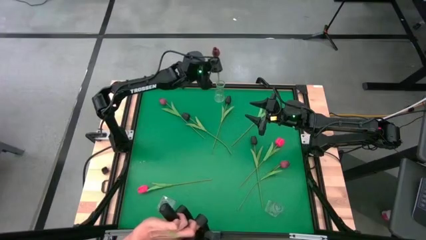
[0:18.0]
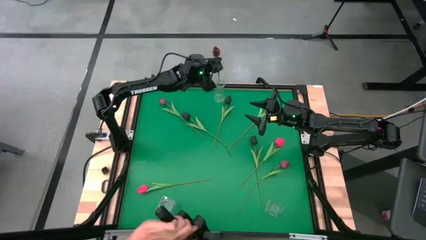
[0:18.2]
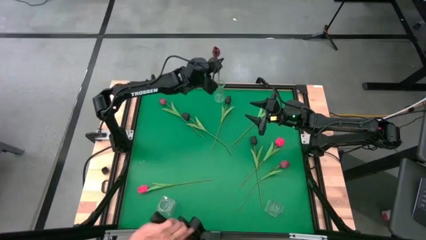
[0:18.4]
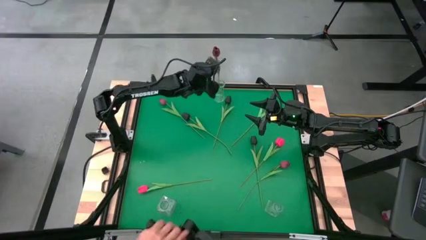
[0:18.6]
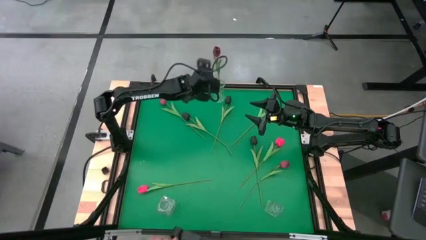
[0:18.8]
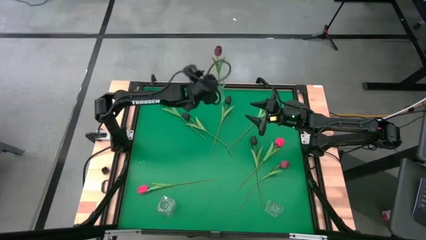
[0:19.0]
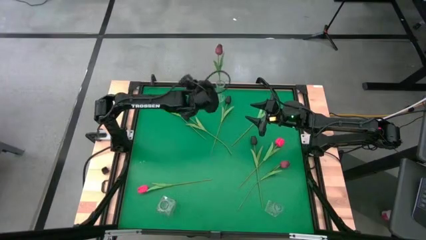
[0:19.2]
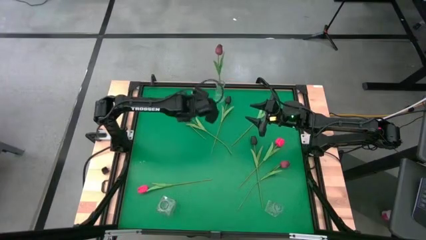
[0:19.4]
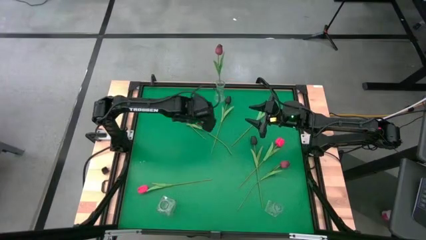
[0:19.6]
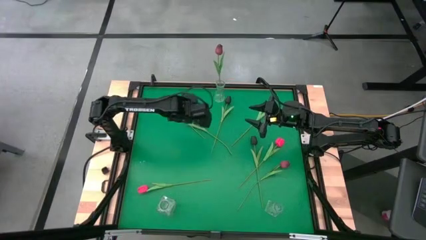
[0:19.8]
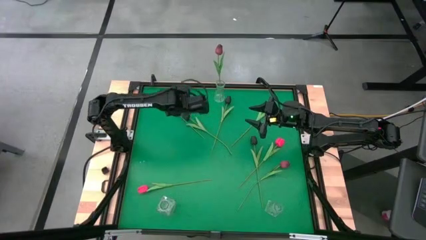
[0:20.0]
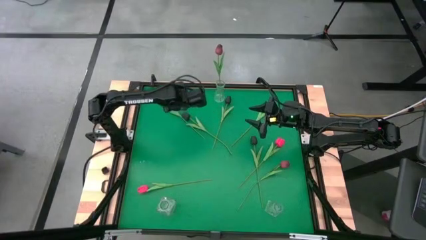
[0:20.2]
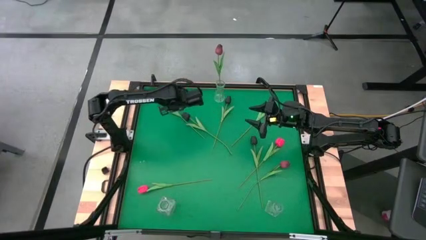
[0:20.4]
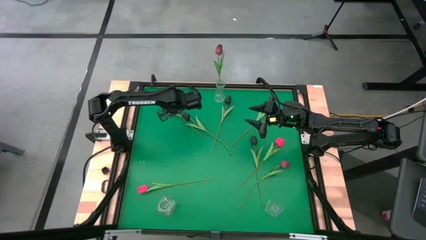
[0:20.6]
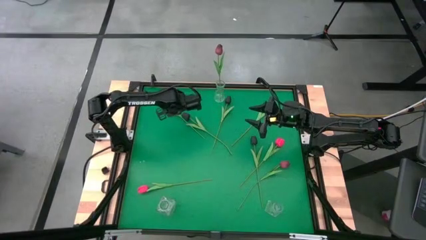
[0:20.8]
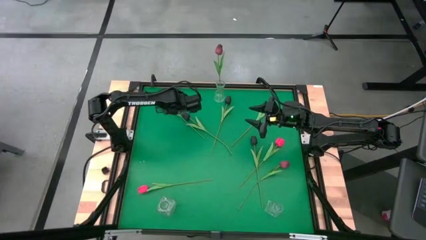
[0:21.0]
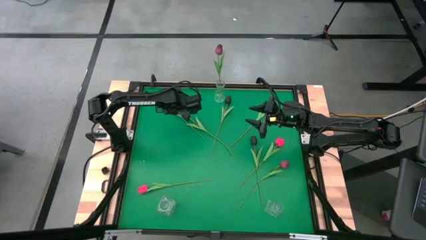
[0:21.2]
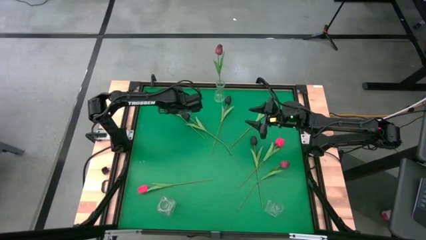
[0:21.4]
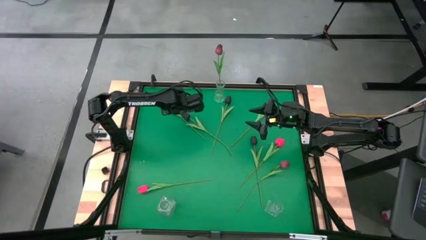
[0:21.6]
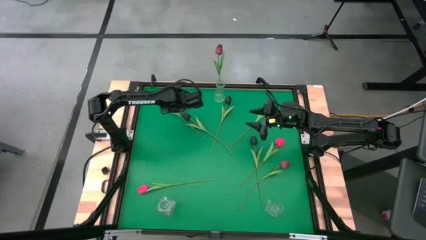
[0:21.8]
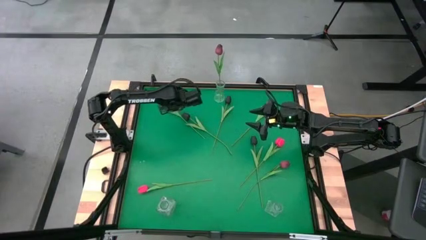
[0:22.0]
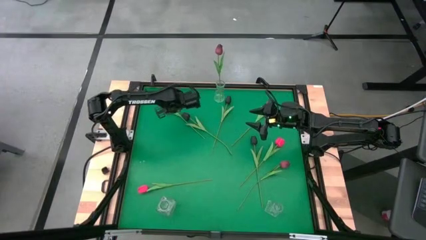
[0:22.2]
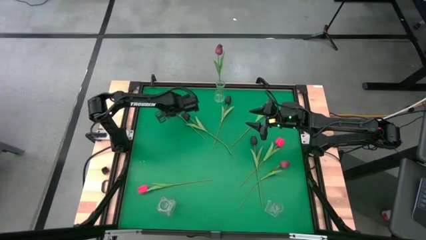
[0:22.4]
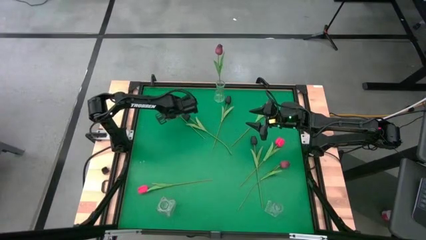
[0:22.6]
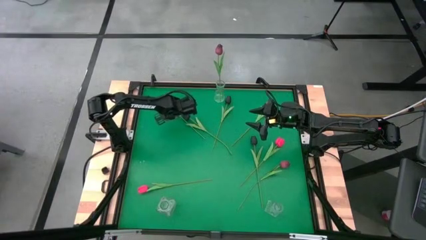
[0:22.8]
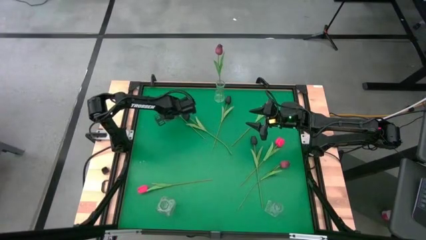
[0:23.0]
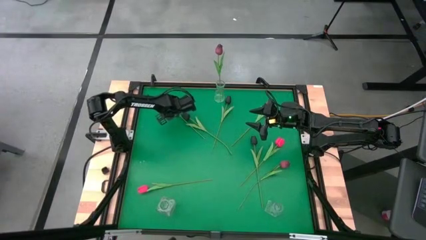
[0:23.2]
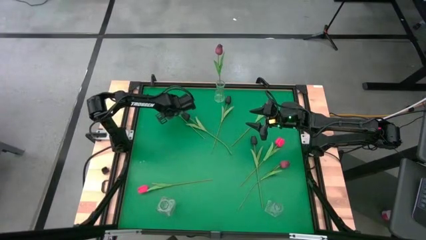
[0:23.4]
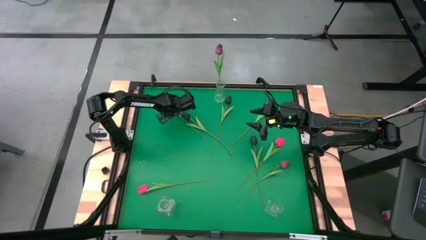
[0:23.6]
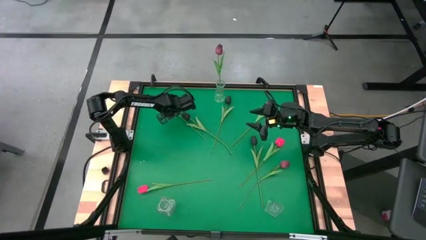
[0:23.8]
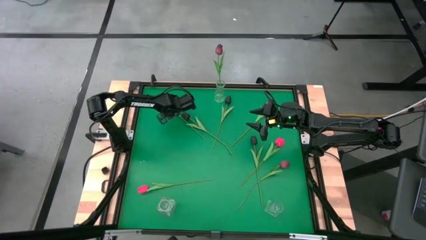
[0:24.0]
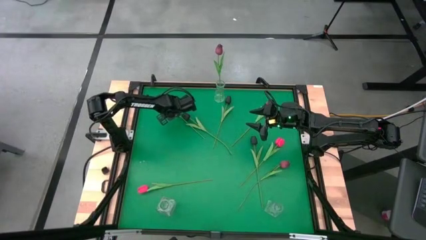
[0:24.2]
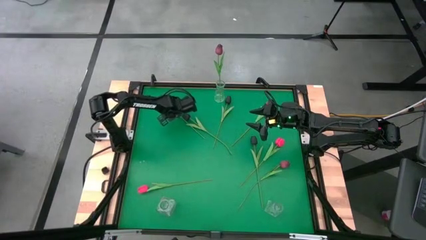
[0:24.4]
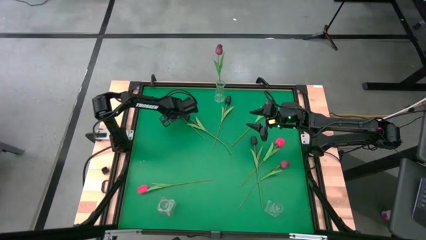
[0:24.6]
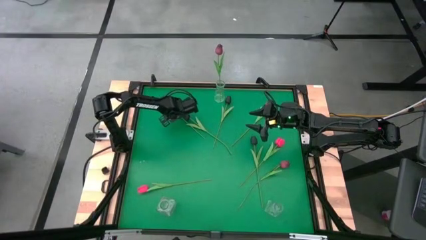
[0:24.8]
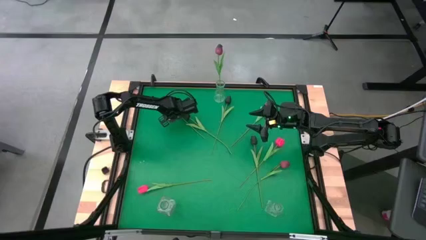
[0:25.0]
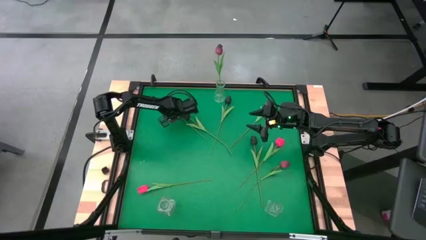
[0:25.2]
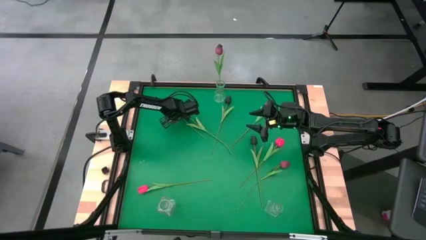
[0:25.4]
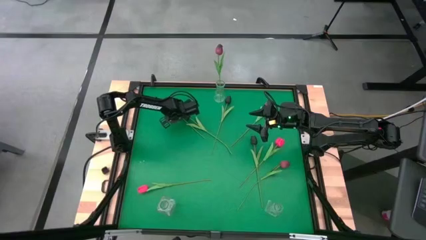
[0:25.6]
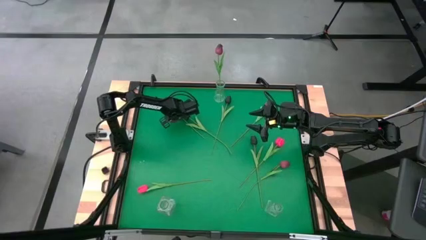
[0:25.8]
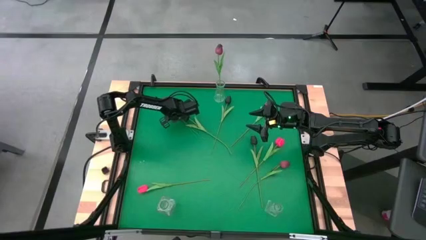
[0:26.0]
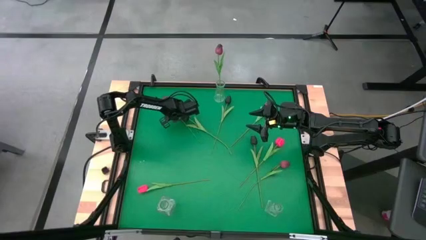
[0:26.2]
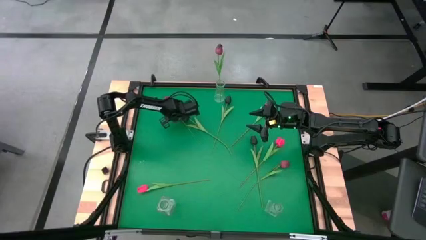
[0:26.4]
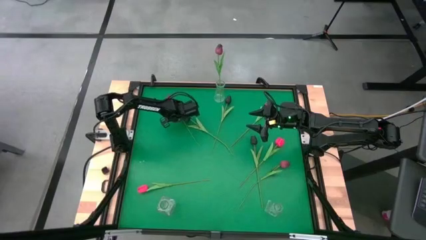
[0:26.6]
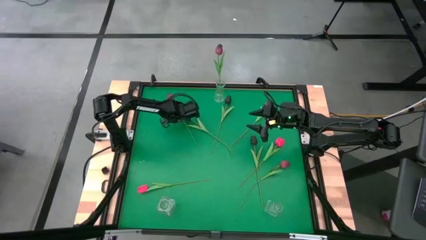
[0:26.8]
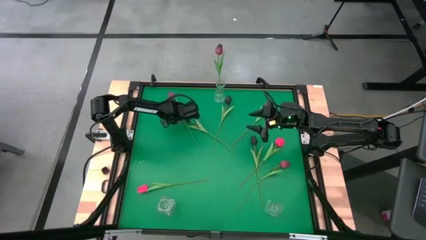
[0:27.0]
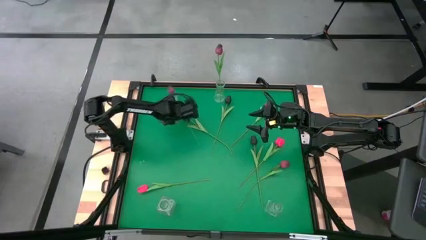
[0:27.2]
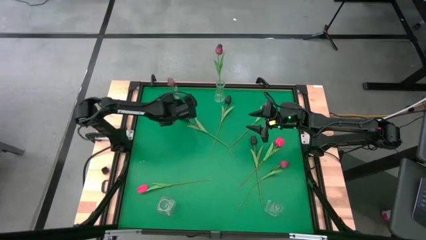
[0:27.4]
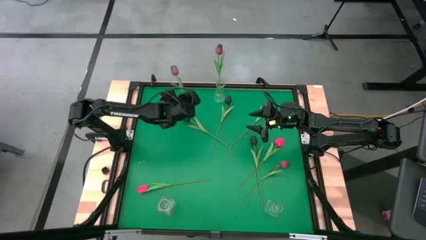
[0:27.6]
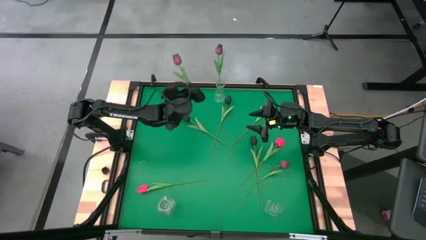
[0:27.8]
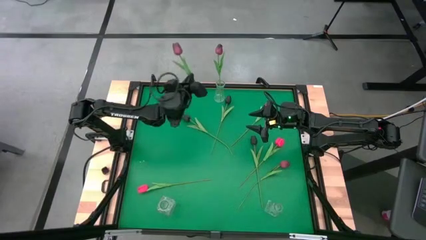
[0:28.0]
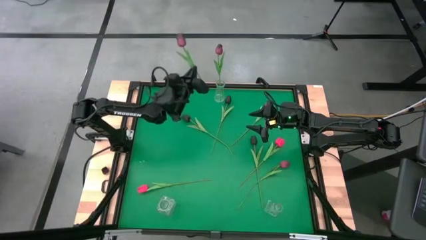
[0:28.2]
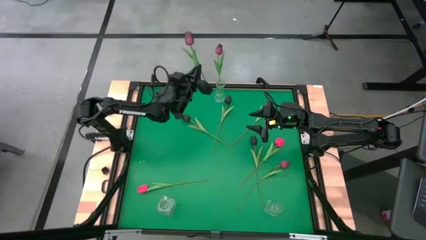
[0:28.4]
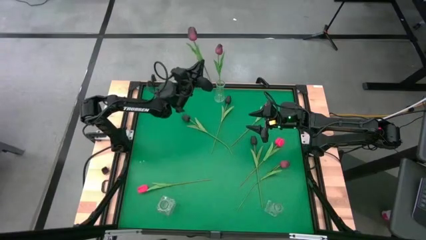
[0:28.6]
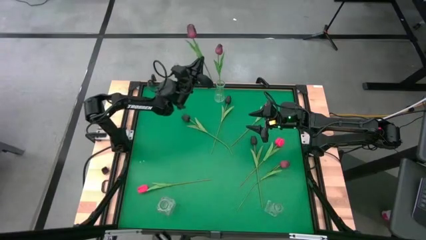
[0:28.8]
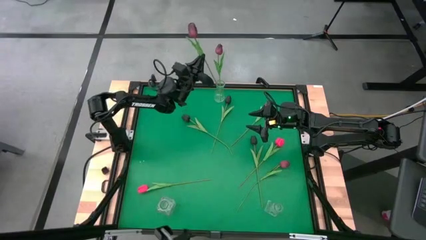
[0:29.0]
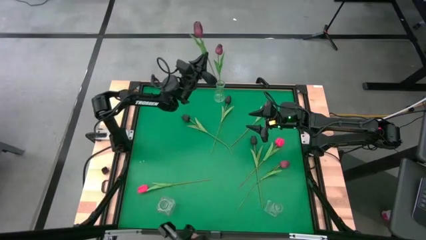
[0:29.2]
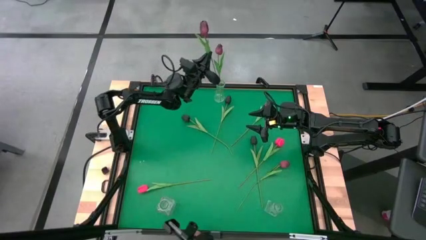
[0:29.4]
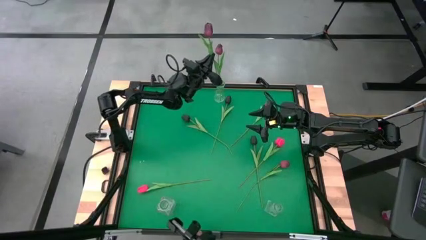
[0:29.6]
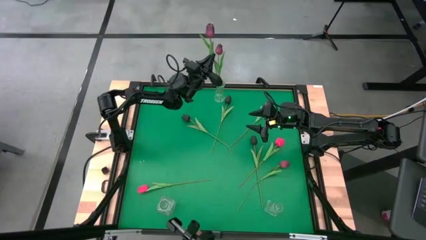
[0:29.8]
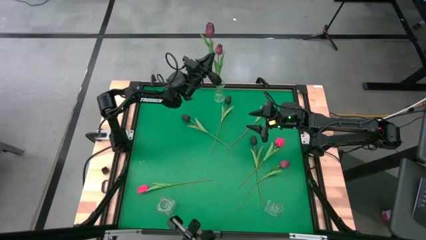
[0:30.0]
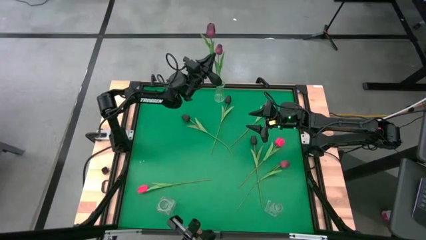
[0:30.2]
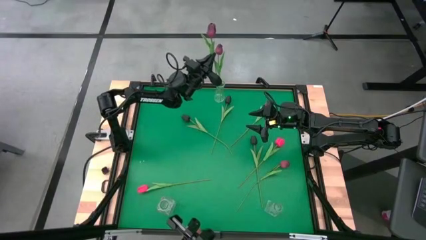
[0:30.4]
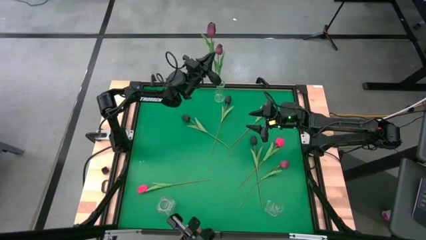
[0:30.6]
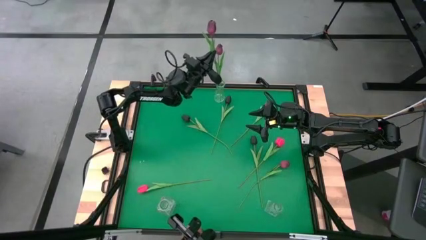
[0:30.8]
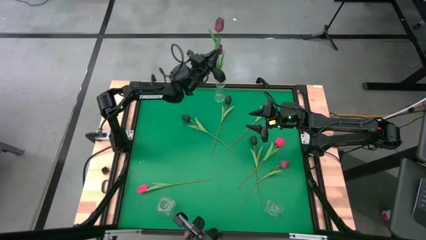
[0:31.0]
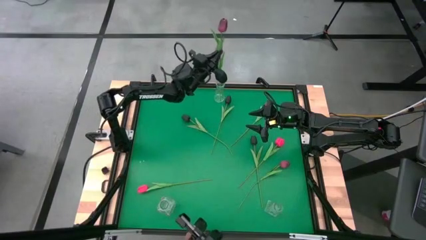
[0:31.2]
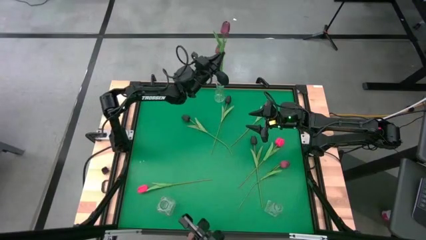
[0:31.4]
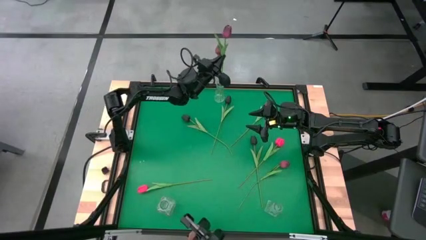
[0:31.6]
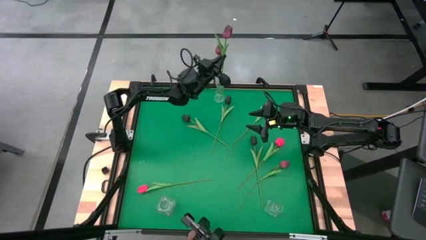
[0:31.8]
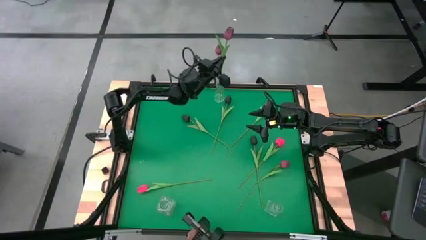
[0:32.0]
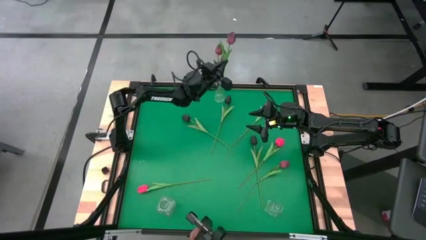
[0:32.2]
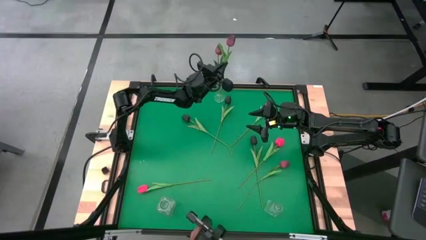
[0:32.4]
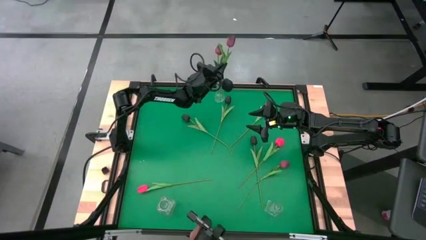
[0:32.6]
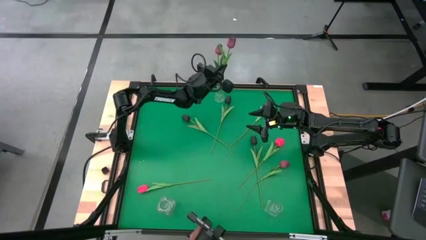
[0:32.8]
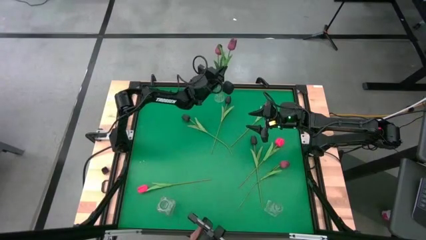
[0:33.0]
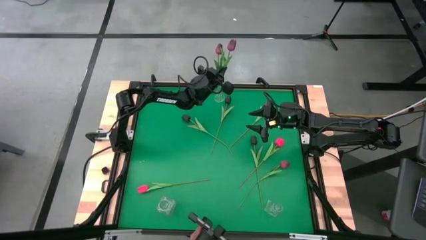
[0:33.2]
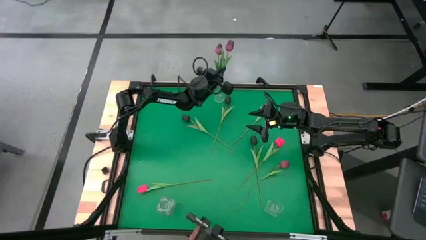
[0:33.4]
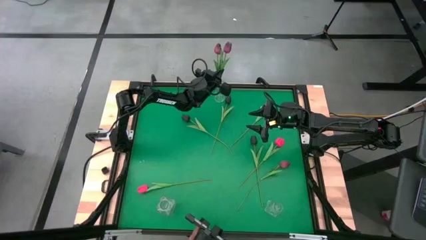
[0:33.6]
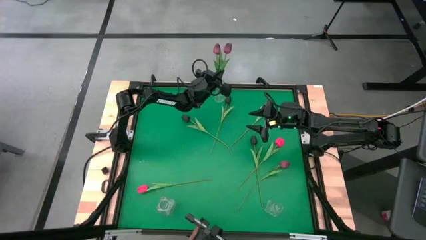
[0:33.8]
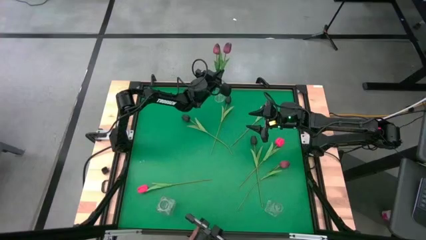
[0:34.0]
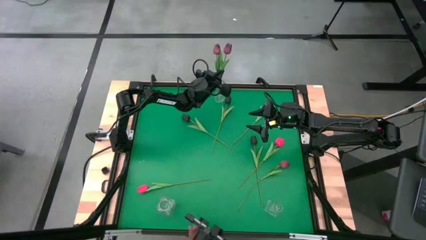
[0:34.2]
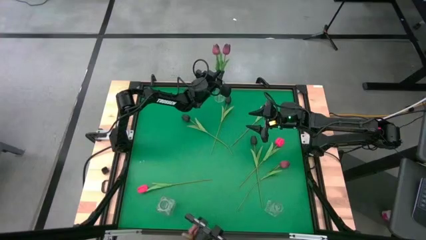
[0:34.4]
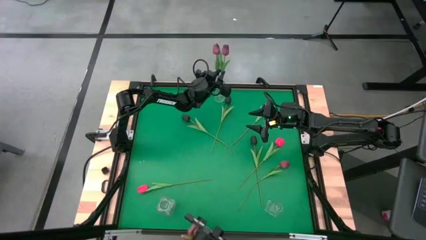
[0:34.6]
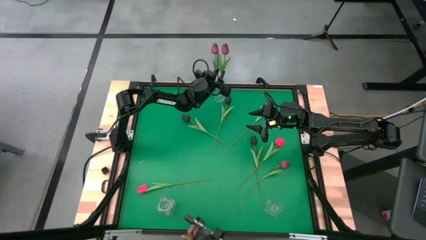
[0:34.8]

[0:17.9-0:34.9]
Task: Sort flowers into vase by color
Put the top dark red tulip into the top transparent vase
